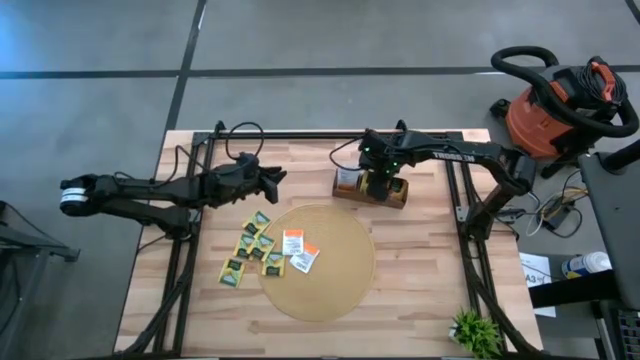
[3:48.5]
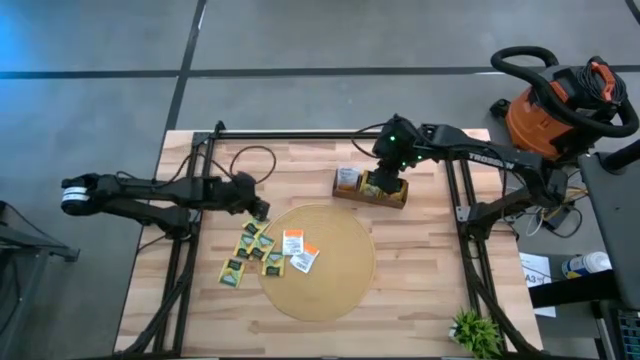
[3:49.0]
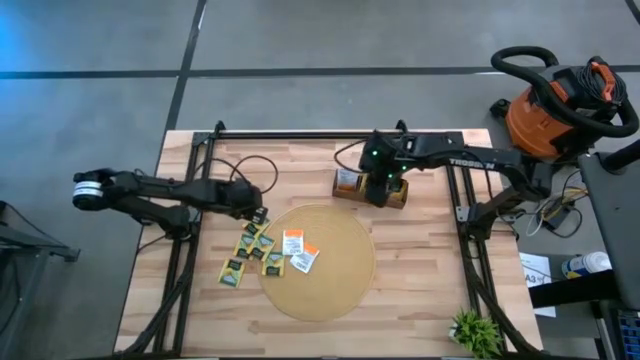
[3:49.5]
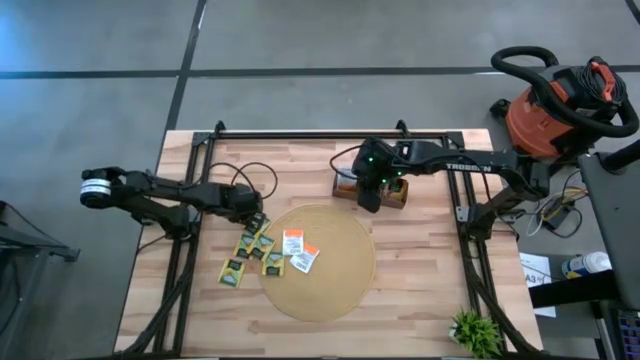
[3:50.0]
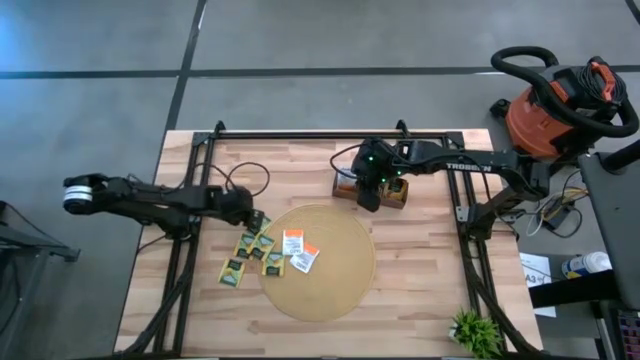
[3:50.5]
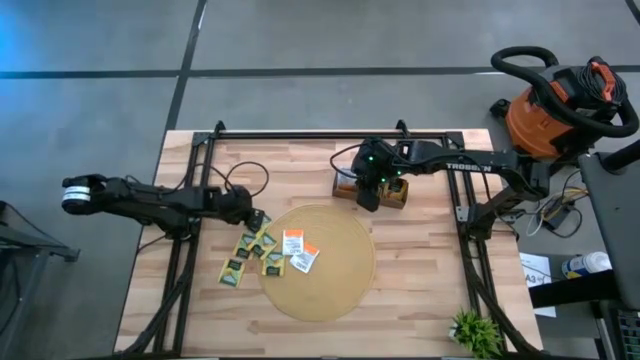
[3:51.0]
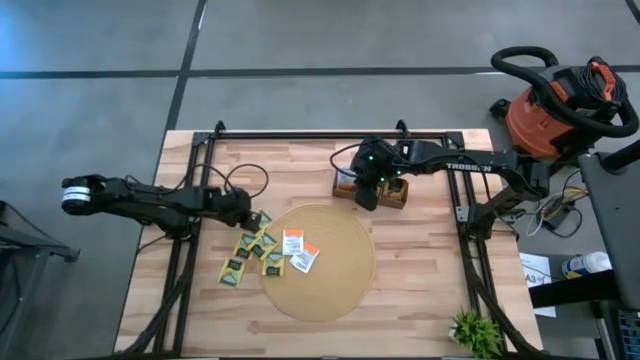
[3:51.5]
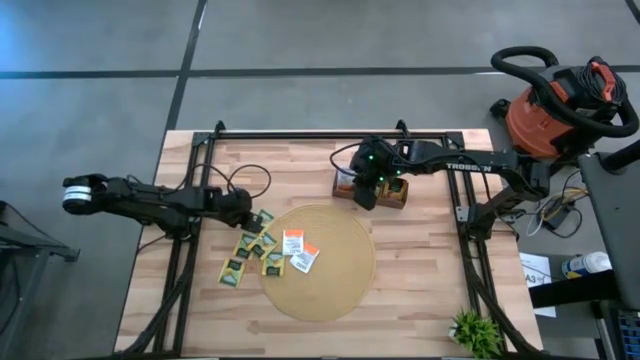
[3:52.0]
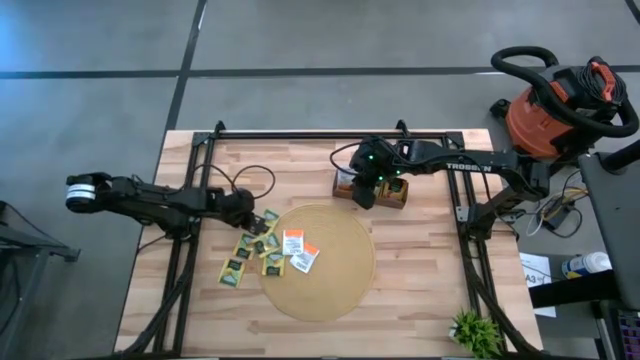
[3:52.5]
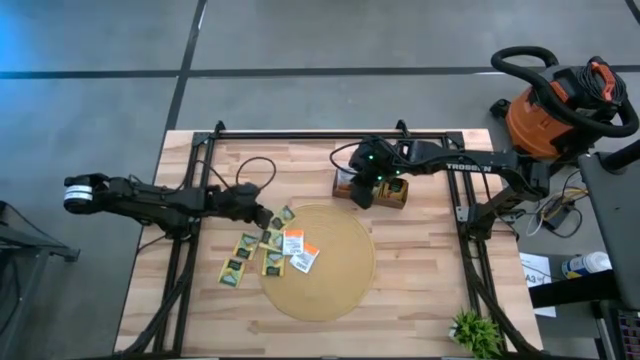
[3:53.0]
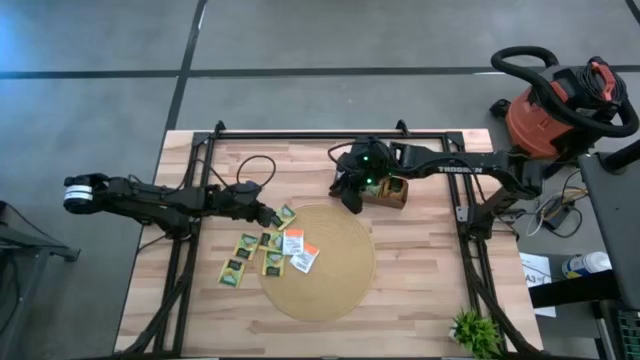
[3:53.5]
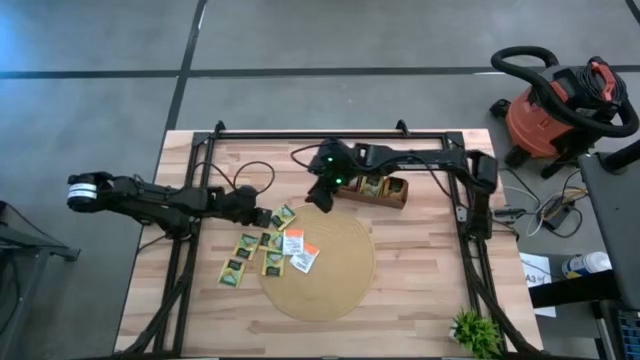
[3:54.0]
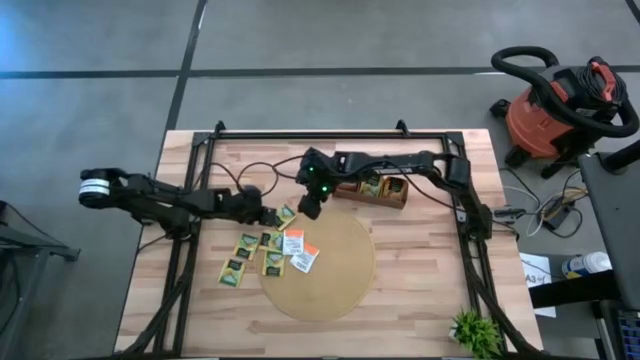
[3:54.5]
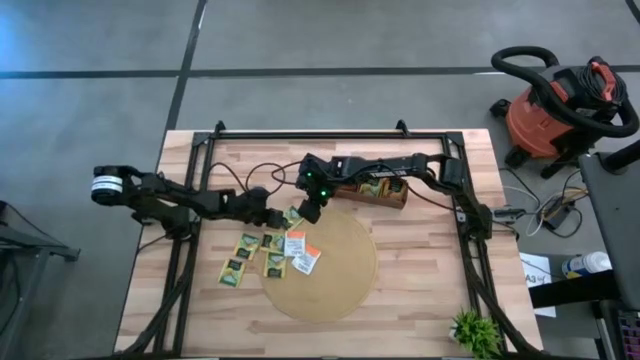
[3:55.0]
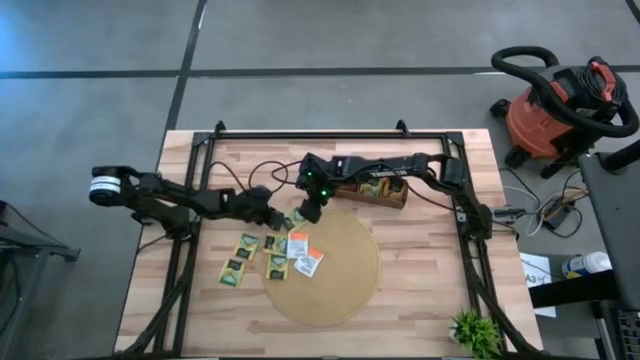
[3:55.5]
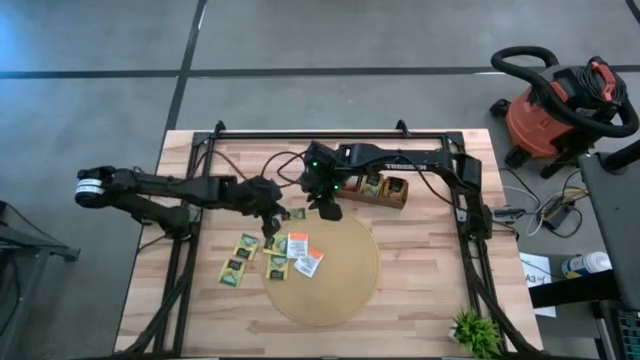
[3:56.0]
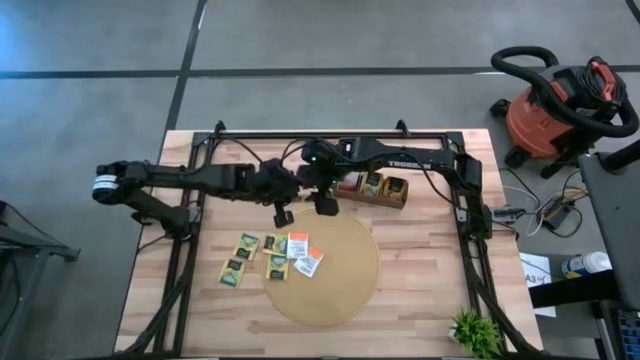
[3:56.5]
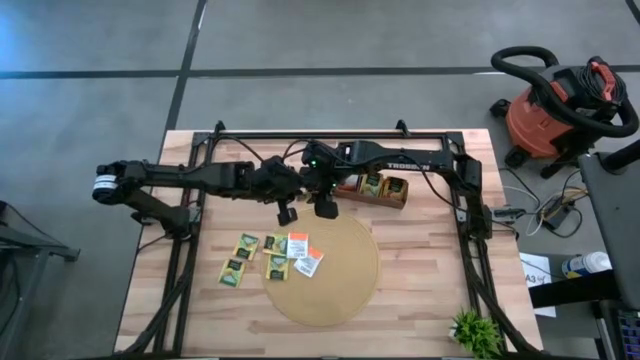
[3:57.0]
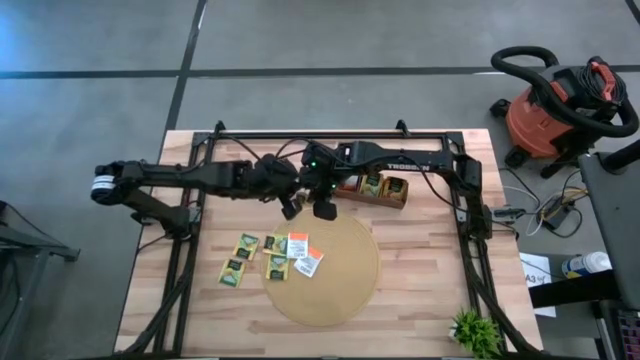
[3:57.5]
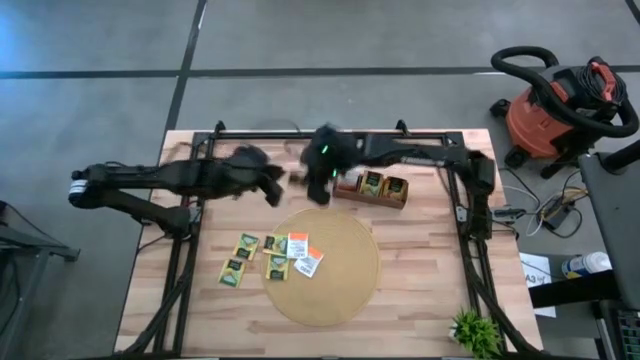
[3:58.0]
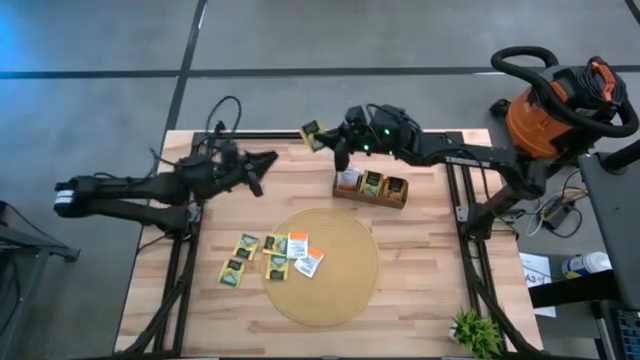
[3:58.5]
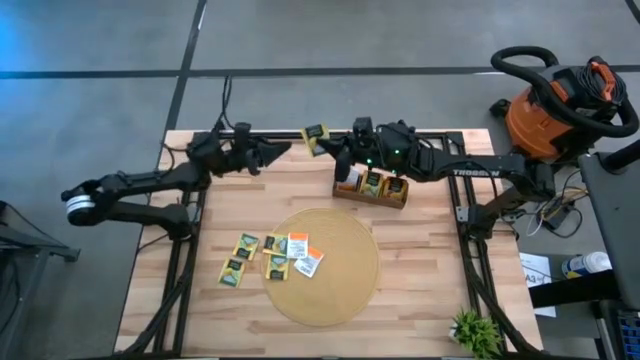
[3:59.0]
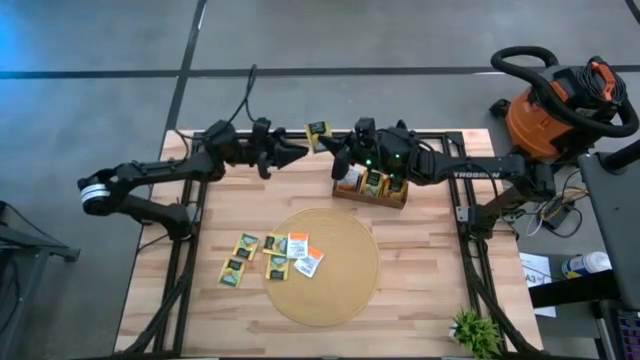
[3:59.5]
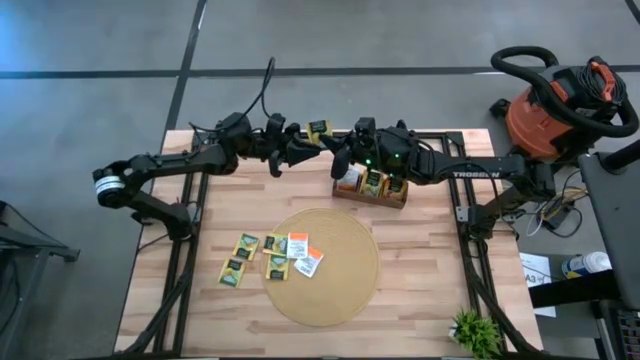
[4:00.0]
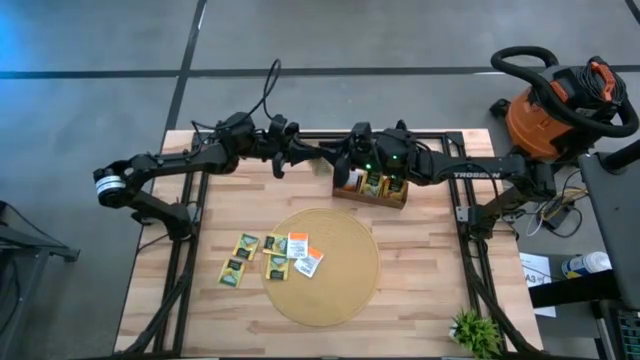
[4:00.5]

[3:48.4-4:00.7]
Task: Pick & Place Tea
Put the lemon tea bag into the middle section of the wooden organizer

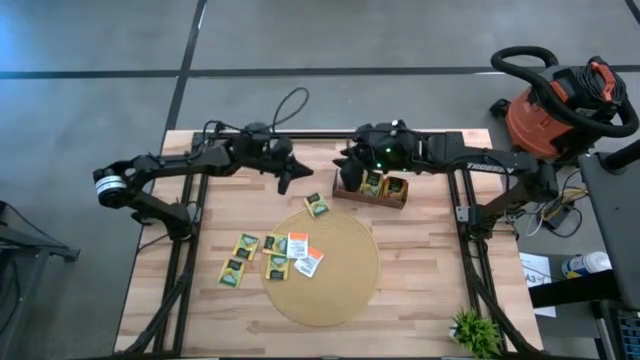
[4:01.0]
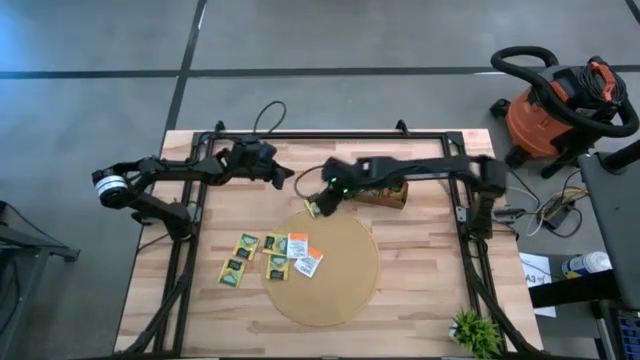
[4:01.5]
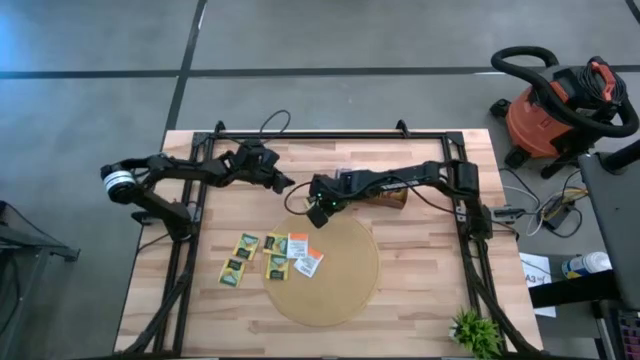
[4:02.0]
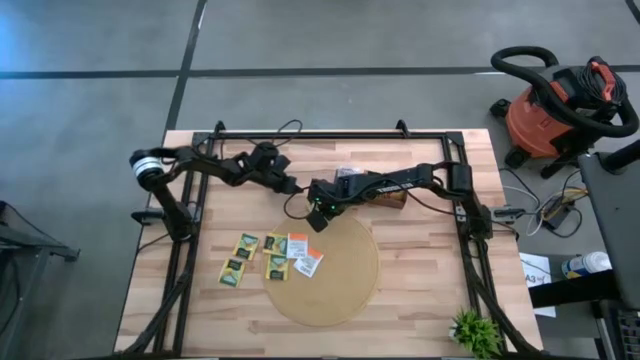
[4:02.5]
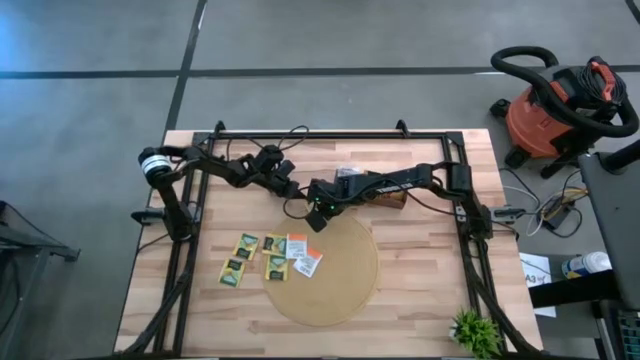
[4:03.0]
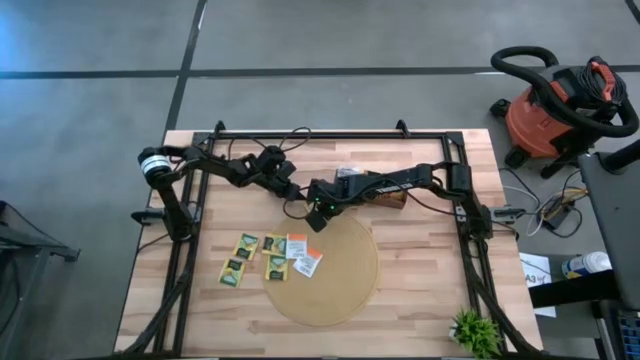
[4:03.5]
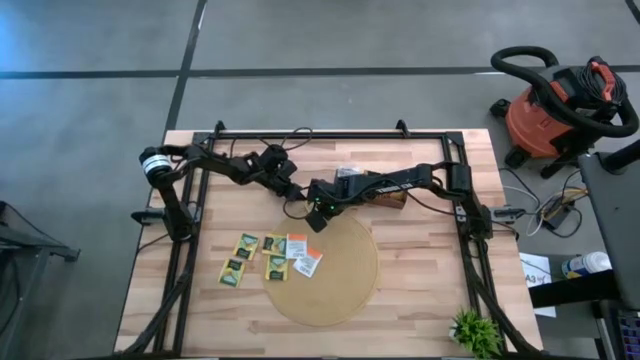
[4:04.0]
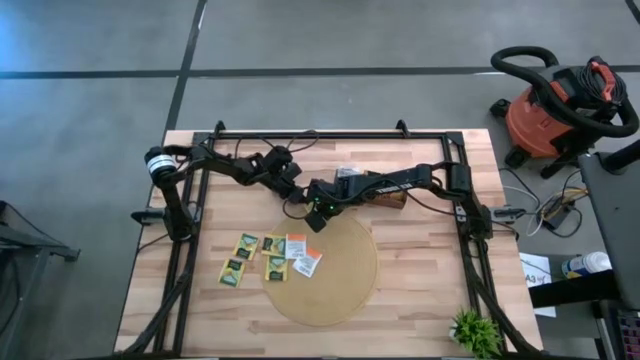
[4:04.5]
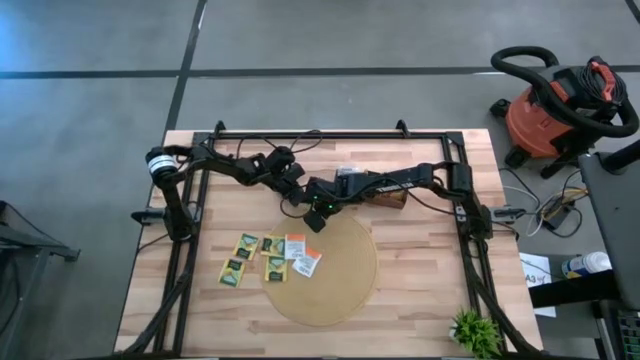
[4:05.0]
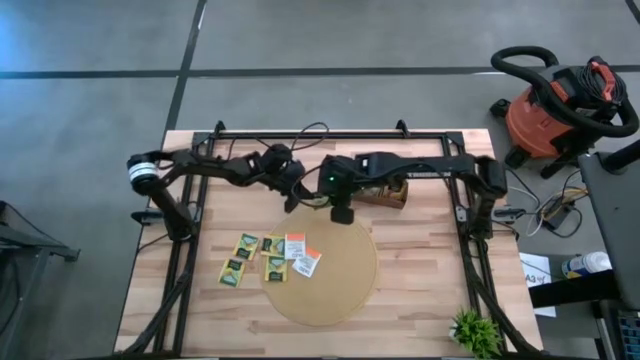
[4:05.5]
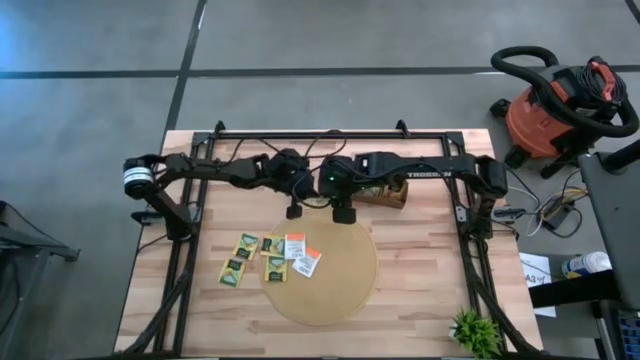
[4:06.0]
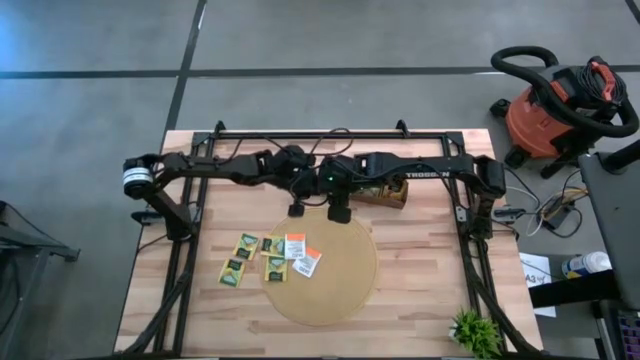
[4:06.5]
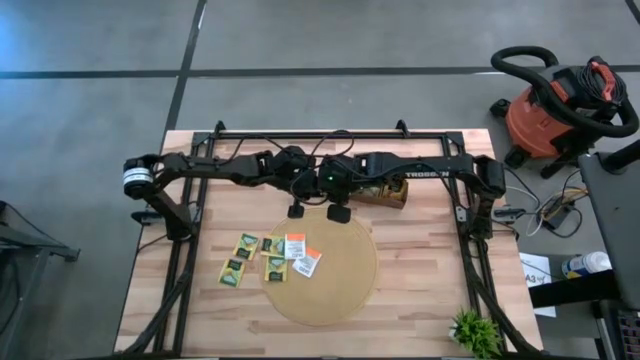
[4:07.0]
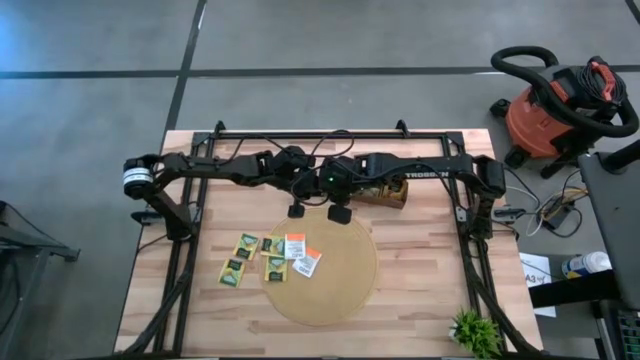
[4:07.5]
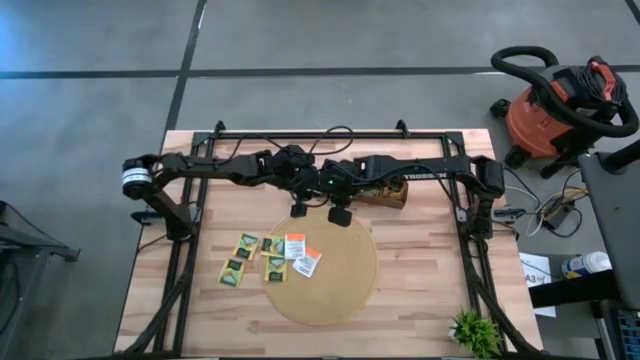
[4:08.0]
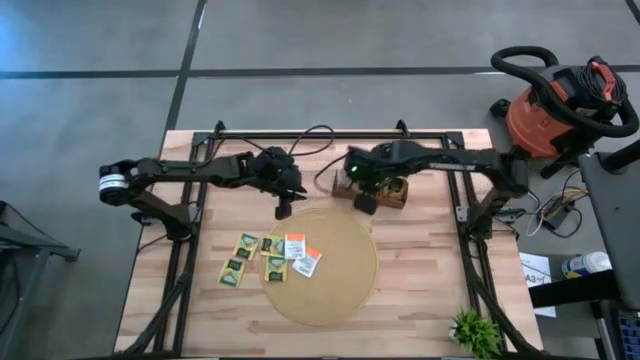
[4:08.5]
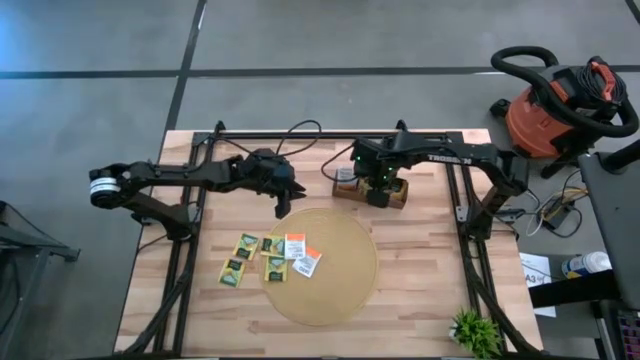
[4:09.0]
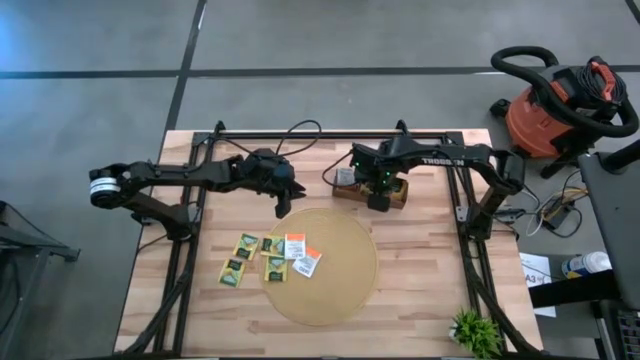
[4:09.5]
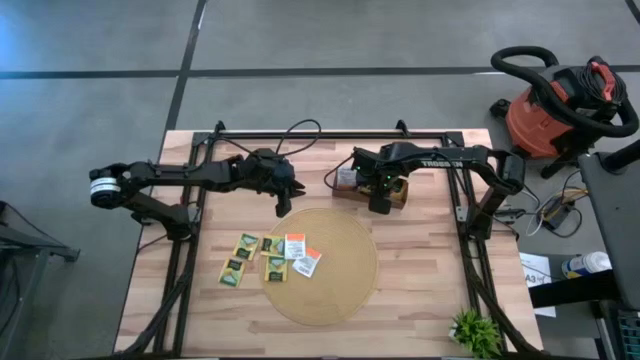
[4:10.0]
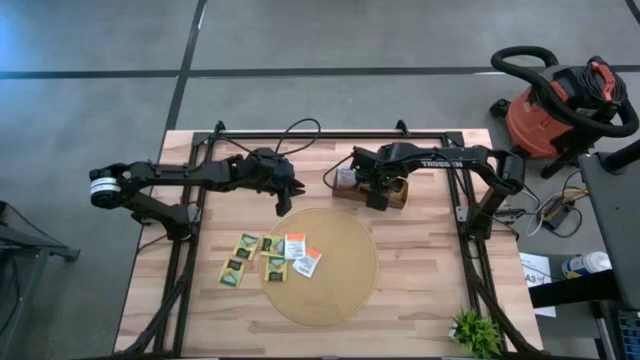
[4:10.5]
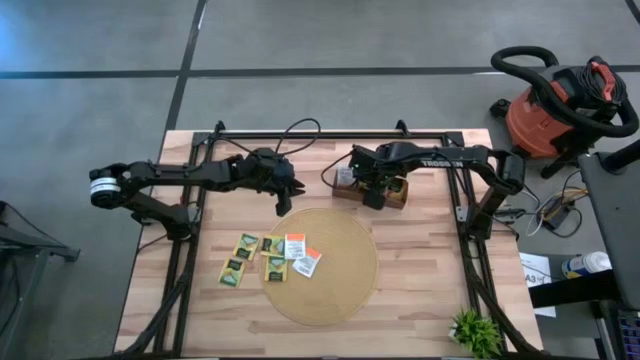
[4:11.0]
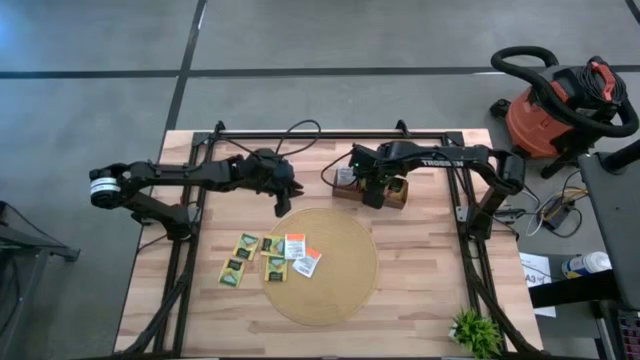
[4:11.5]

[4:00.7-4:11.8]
Put the lemon tea bag into the middle section of the wooden organizer
